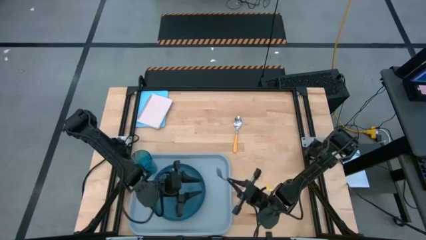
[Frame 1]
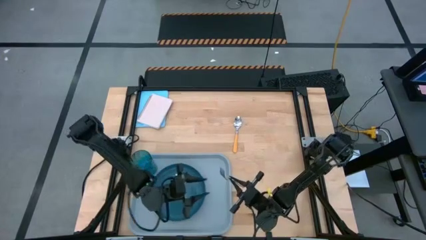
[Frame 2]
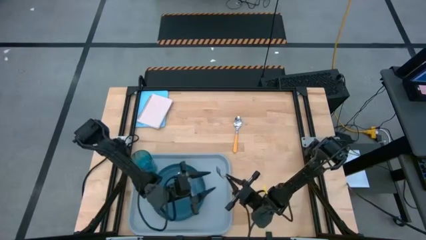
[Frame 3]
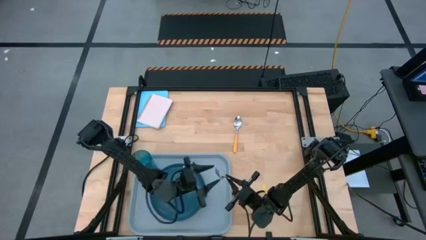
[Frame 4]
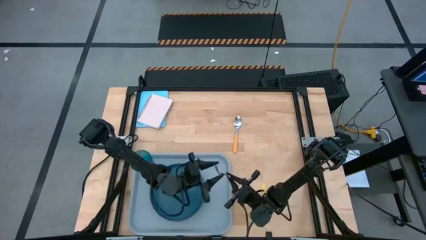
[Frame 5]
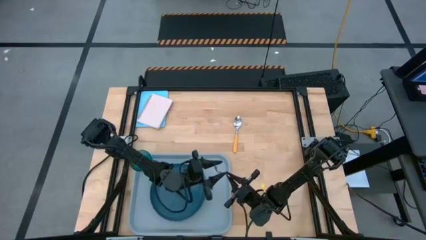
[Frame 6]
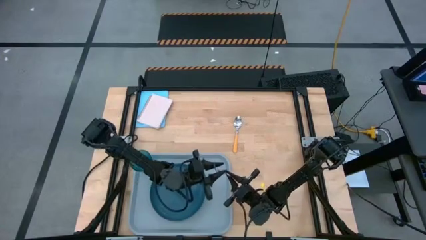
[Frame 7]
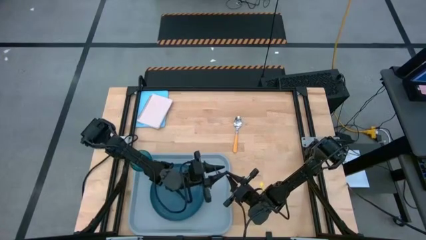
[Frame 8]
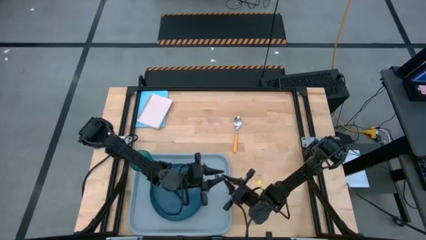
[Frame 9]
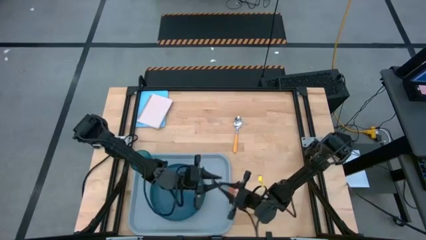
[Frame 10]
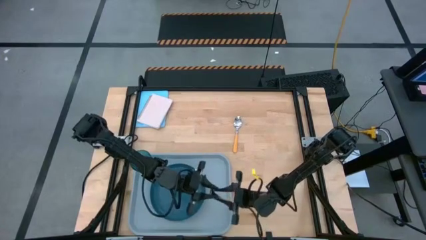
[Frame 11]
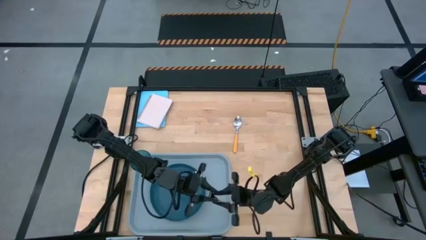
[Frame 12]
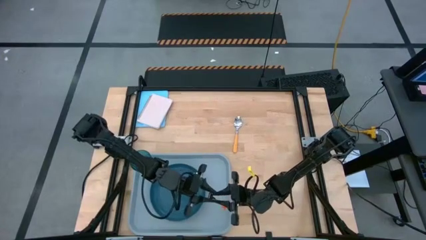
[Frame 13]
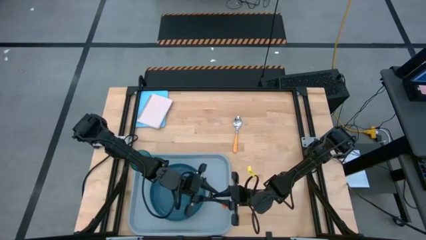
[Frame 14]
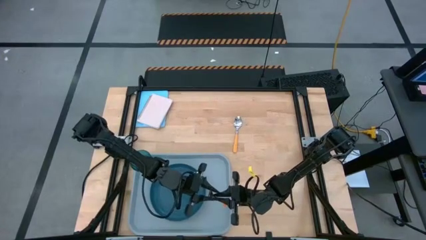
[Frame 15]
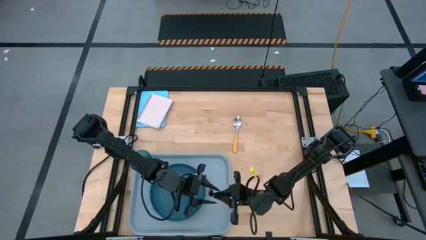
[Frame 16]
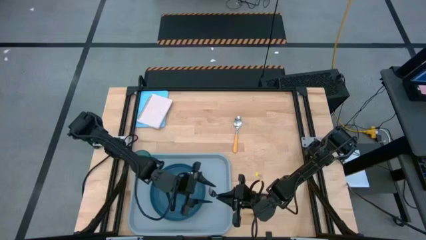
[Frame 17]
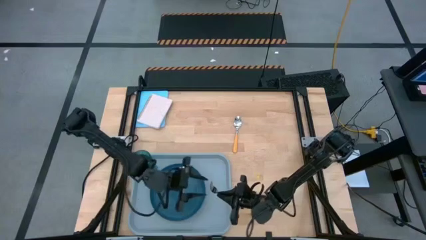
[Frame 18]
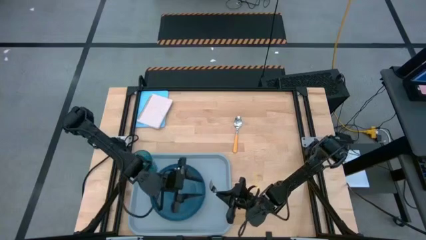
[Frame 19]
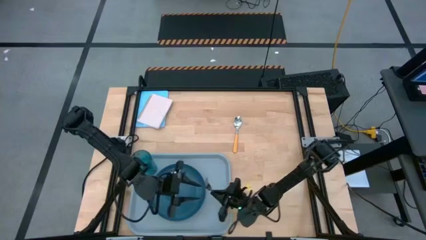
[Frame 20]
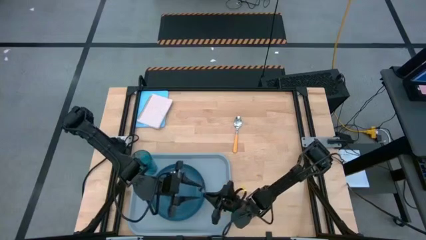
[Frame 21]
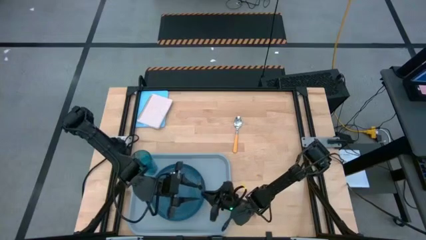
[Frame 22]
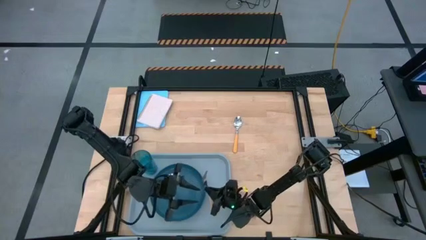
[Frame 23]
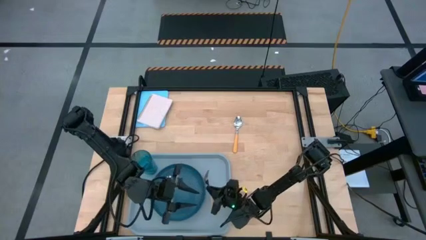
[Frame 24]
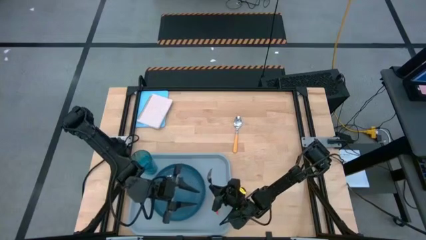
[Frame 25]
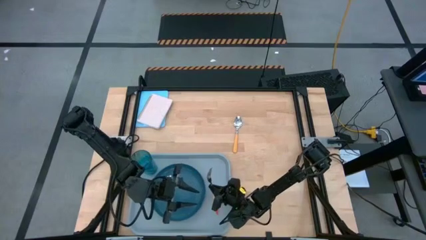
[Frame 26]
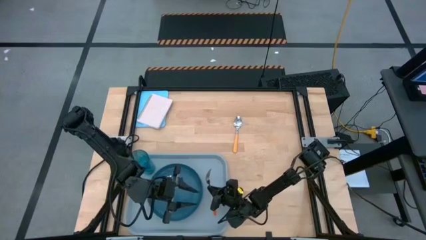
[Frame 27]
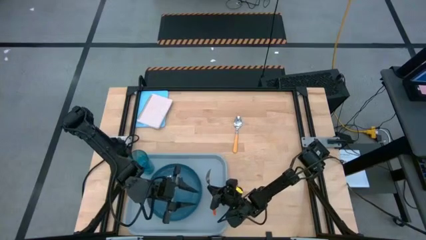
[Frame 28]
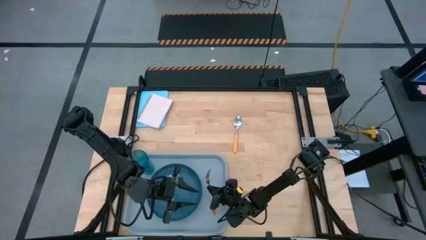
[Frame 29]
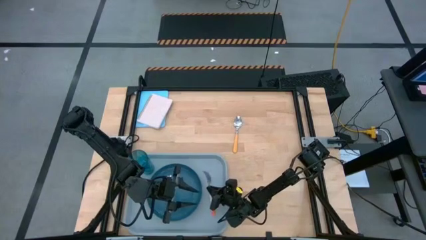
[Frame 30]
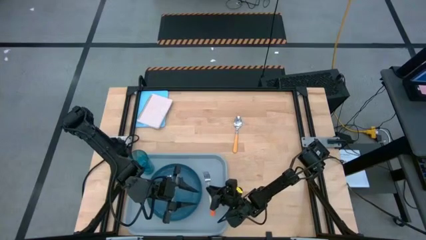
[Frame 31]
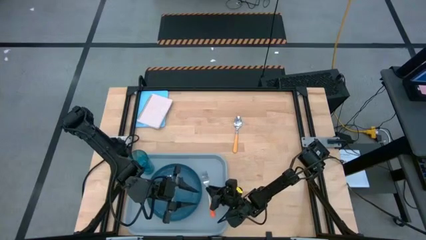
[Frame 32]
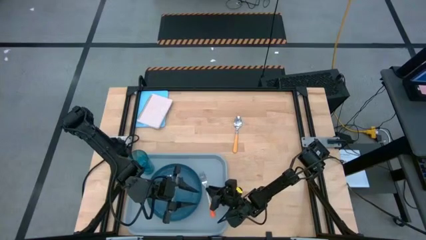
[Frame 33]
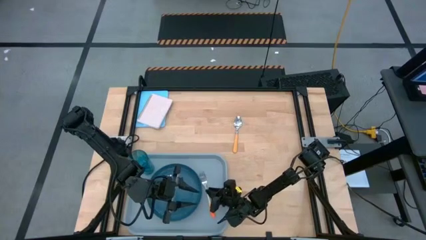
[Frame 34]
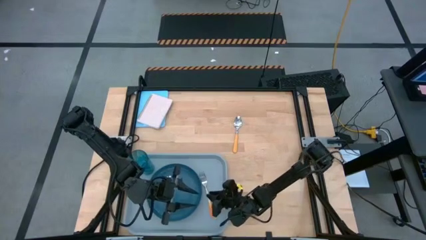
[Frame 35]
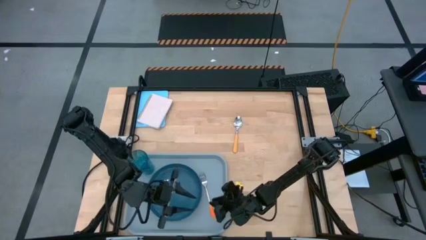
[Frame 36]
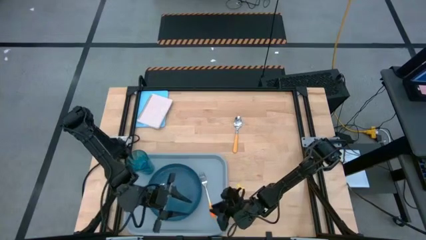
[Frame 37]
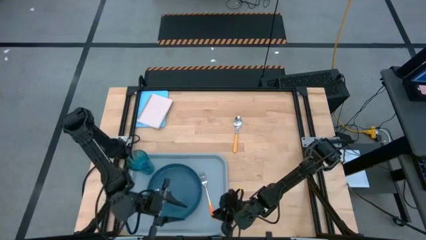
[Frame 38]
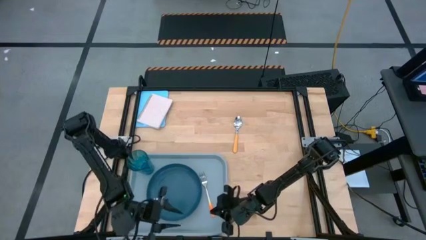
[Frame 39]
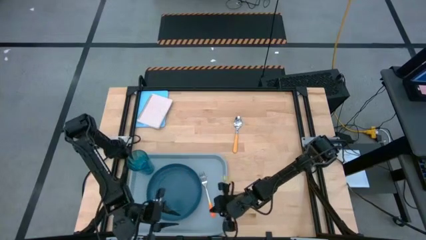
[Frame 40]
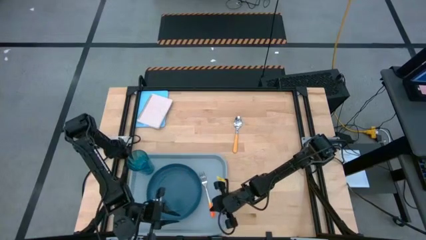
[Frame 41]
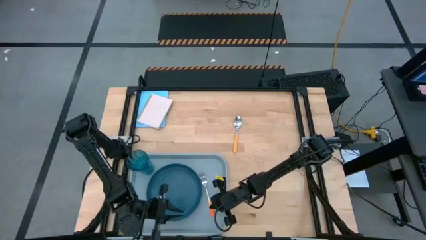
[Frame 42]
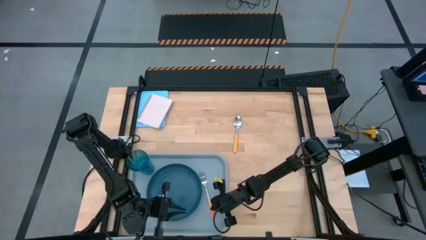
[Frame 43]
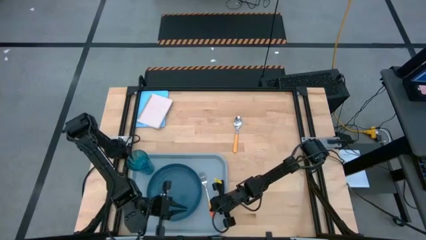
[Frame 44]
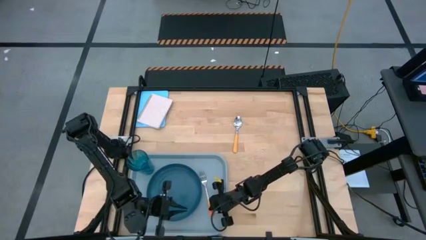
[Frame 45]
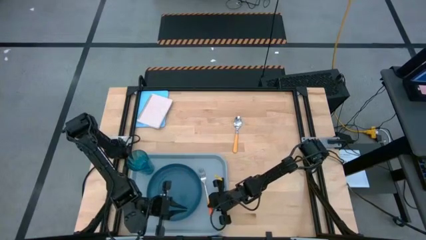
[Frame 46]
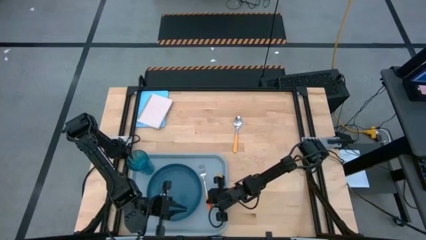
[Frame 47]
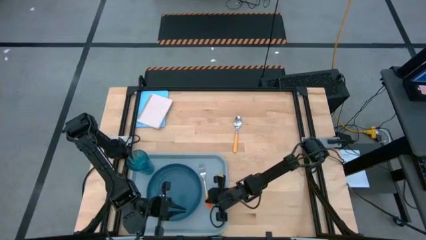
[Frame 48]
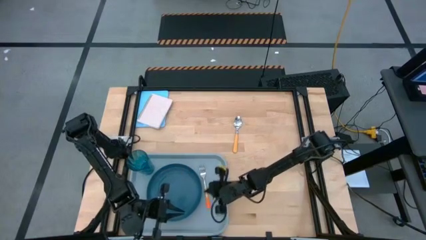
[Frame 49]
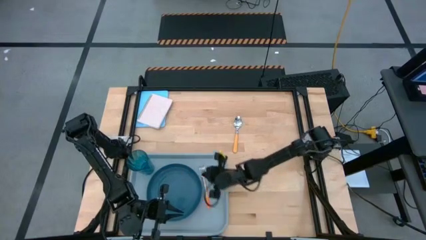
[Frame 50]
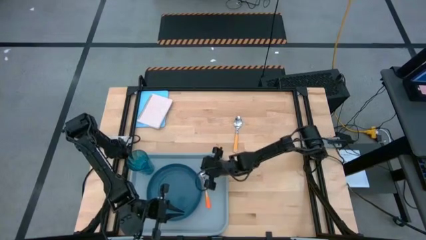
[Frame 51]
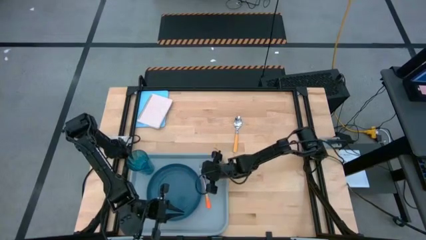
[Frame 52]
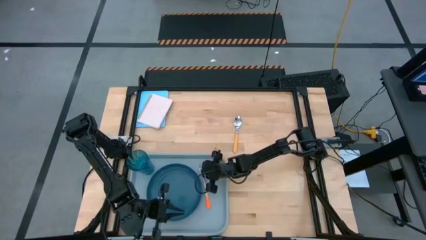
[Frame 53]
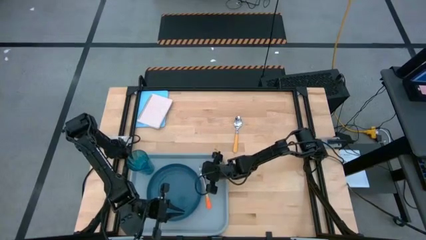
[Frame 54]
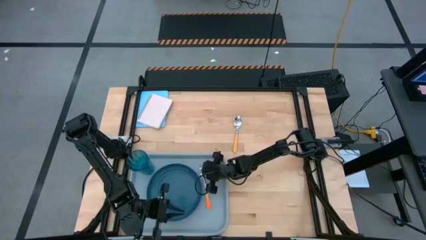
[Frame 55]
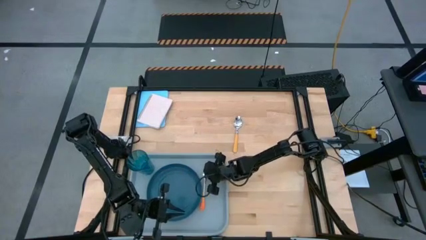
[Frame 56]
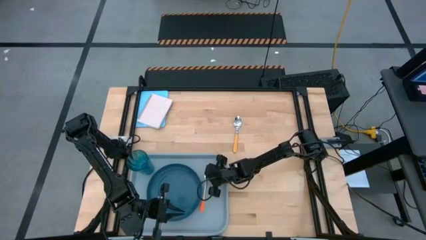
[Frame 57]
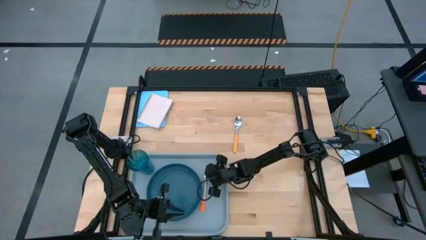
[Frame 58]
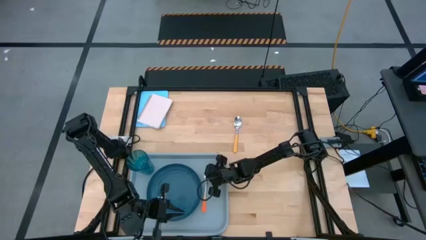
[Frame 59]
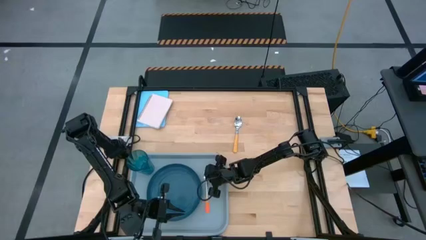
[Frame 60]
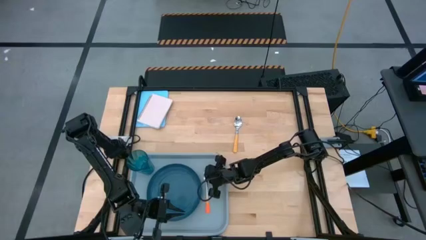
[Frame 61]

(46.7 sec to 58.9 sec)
Task: Pick and place plate/cup/fork/spoon on tray
Put the orange fork on the gray tray to the right of the dark blue plate
